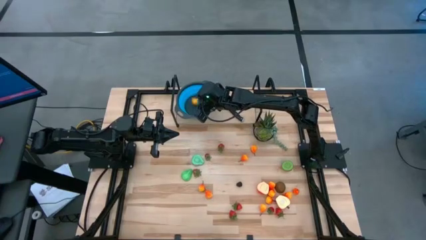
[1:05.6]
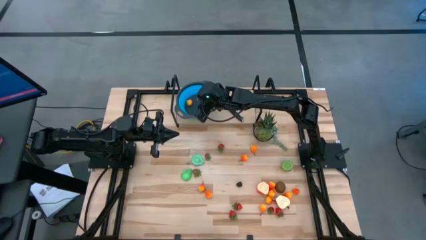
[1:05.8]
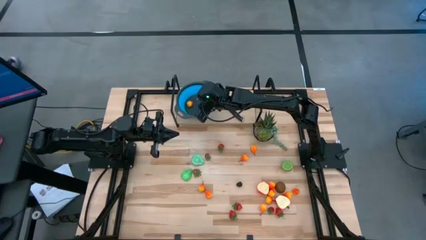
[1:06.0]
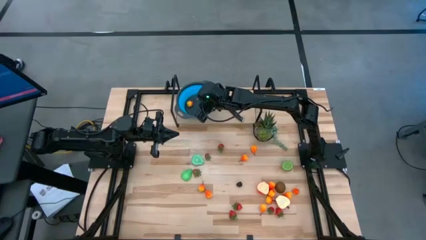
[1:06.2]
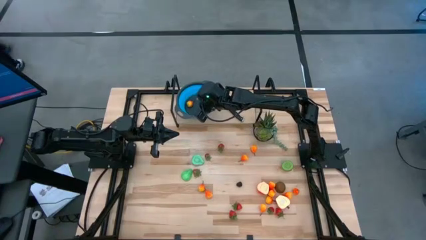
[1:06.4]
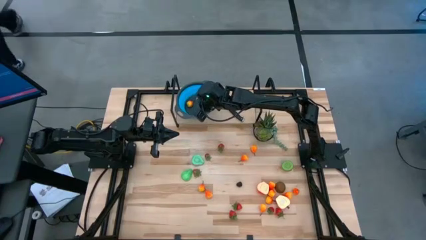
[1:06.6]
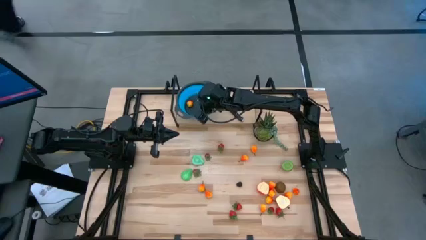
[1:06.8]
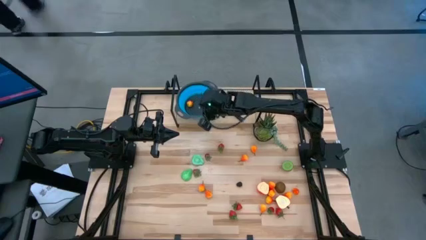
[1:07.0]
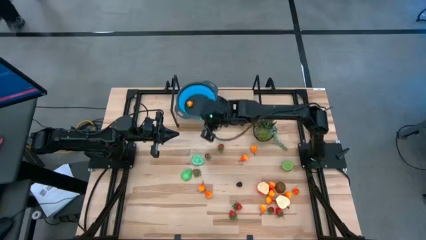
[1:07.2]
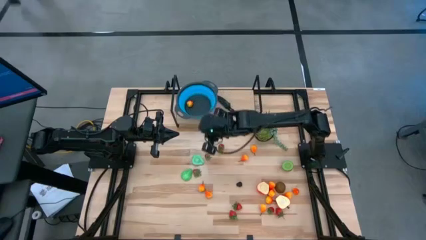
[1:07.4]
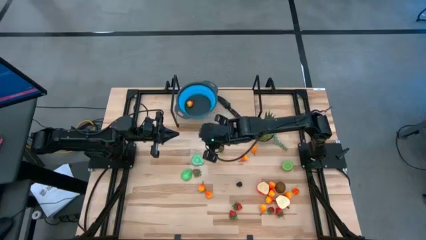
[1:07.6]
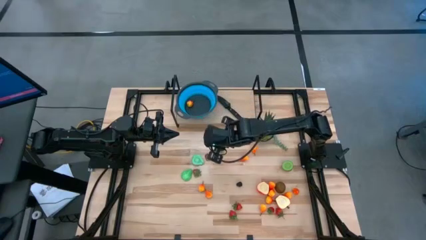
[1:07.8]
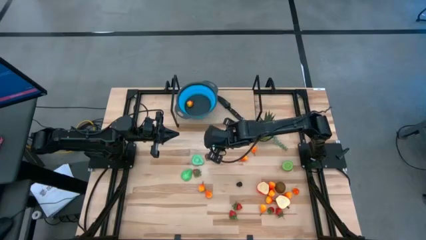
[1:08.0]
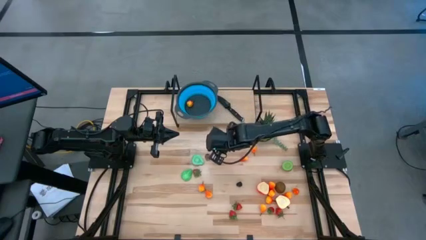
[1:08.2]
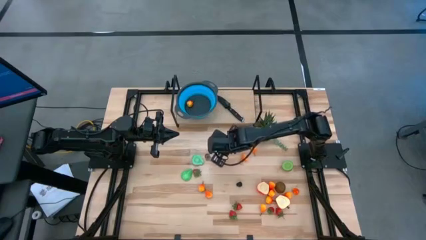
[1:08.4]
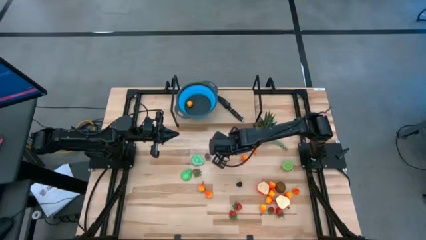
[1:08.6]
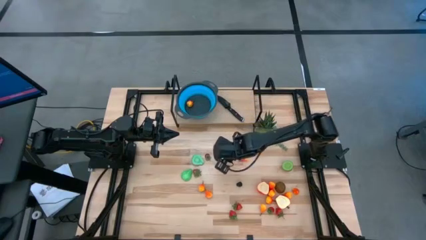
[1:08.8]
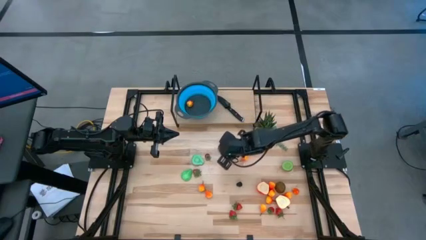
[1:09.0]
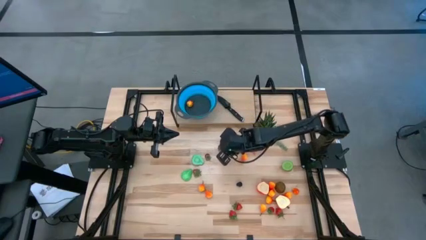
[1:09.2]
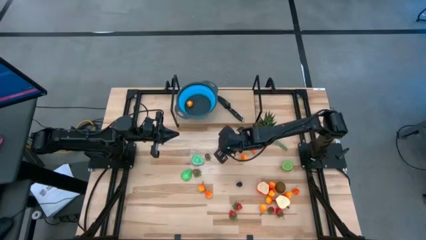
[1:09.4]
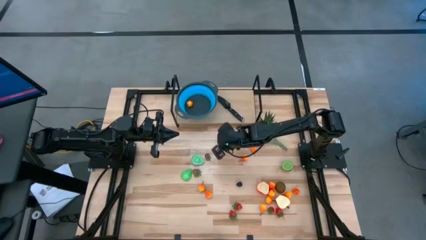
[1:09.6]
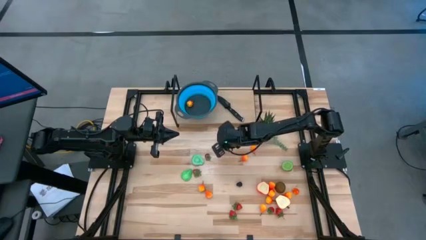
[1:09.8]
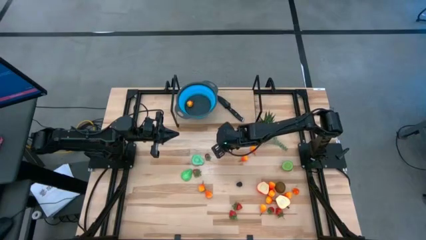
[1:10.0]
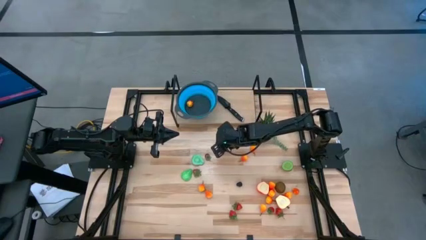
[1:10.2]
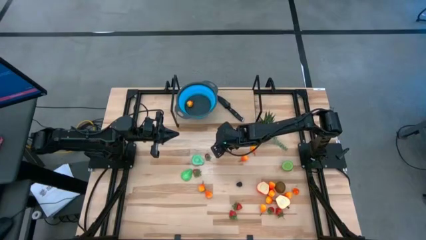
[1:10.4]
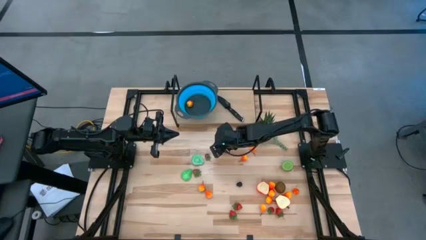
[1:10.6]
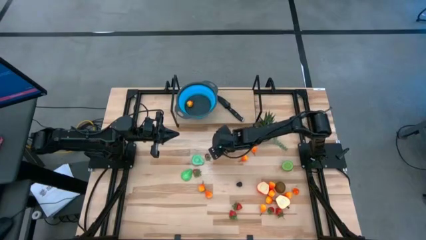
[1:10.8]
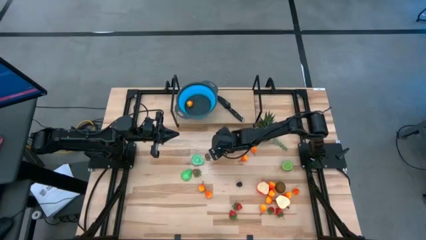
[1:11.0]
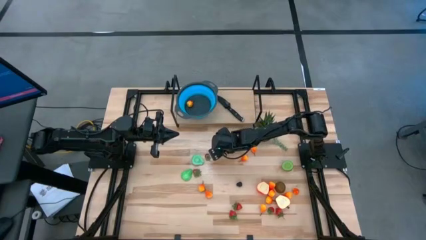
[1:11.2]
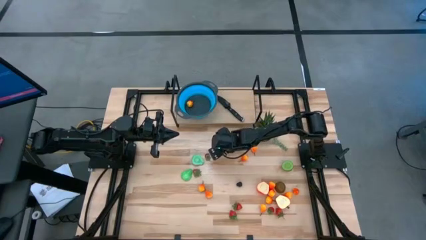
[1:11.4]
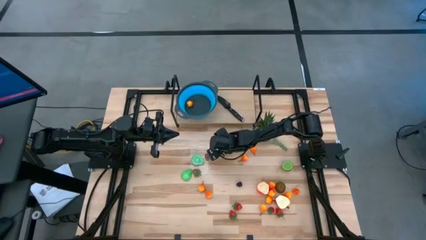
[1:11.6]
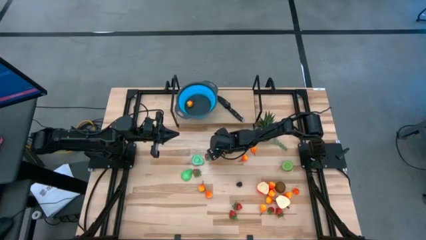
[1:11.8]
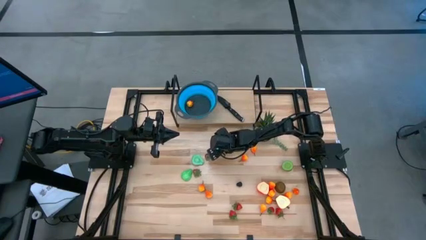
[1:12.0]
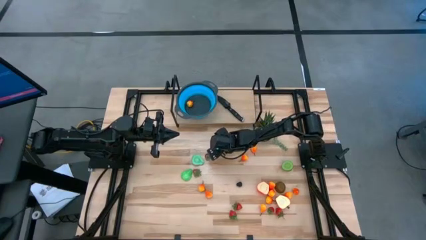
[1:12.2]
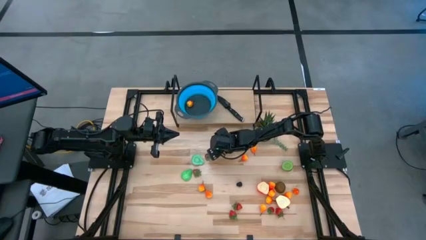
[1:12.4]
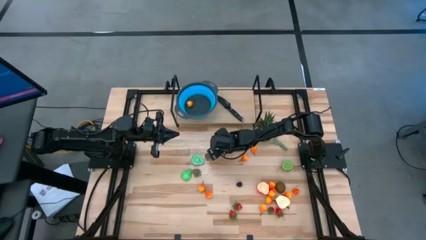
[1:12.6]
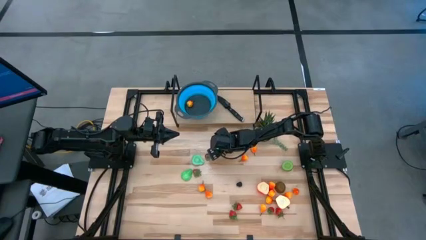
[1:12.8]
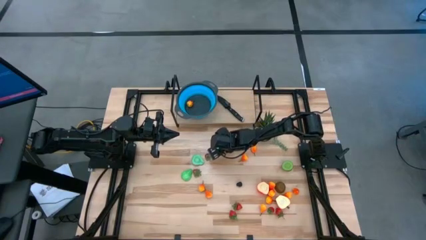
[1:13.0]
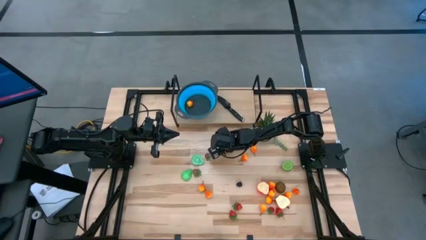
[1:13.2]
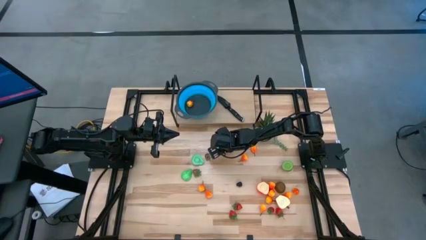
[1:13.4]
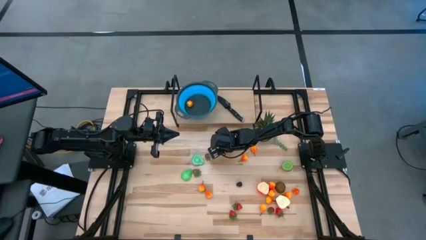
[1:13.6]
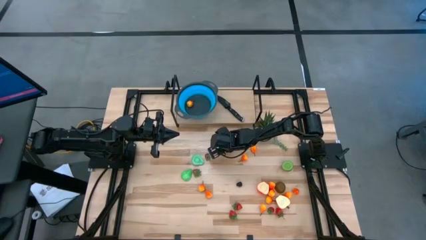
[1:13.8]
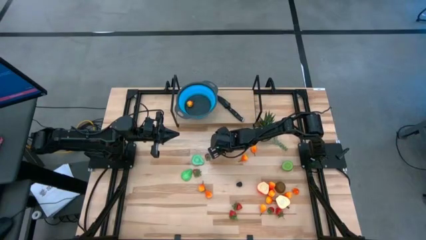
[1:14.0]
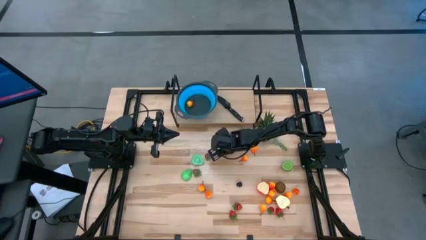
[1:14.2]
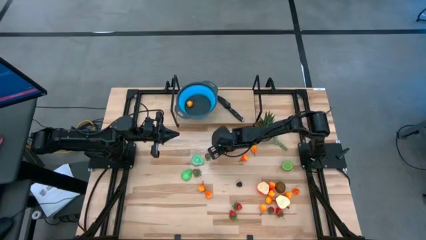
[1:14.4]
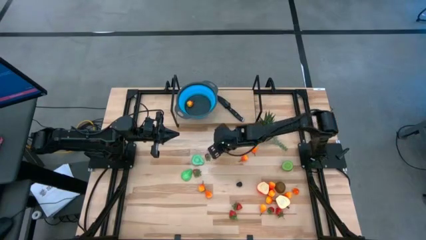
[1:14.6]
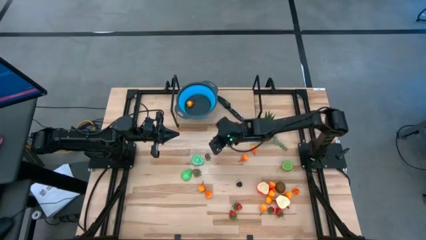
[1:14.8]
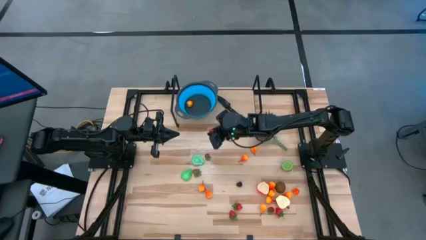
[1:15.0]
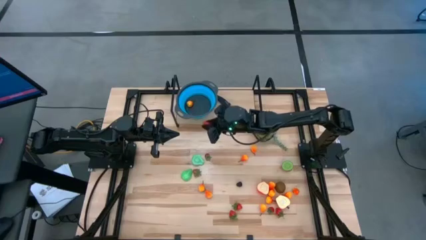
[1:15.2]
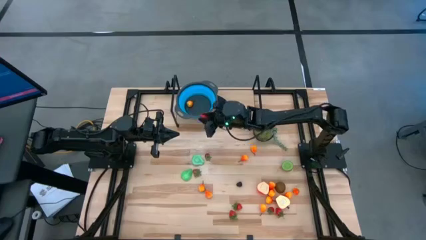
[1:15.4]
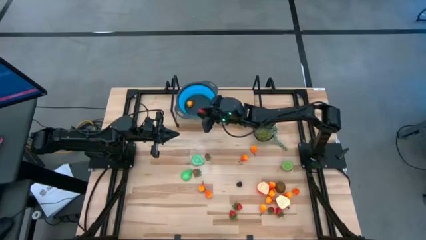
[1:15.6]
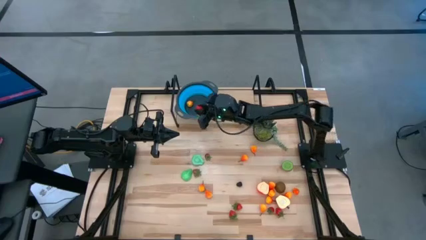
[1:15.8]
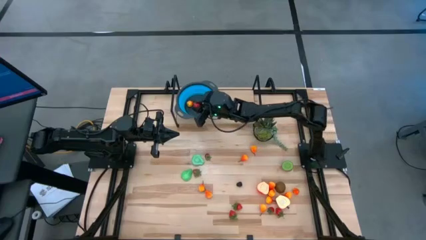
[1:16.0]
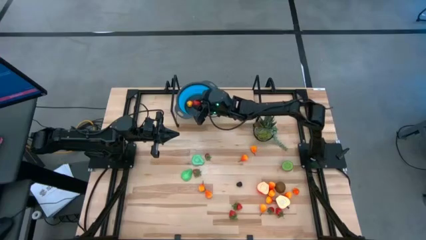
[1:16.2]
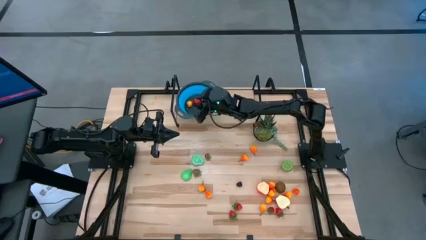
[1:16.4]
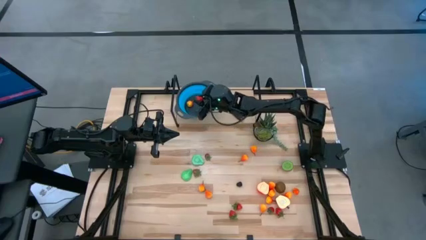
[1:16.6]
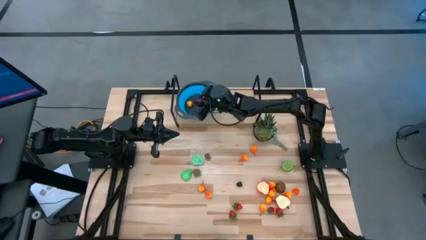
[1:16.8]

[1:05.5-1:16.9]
Task: Pick & Place Fruit
Put the strawberry into the basket

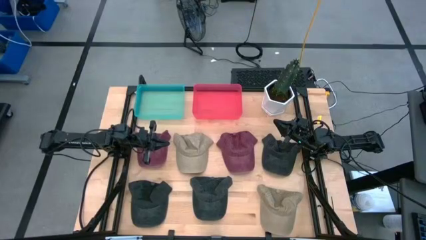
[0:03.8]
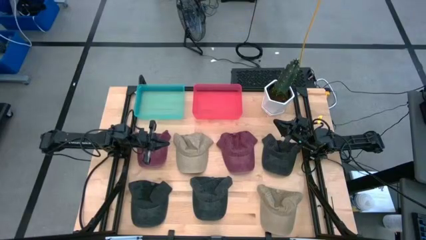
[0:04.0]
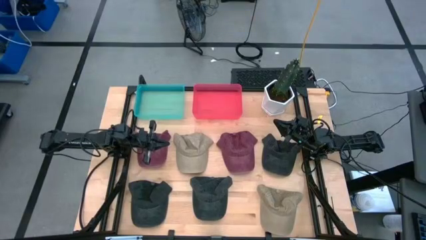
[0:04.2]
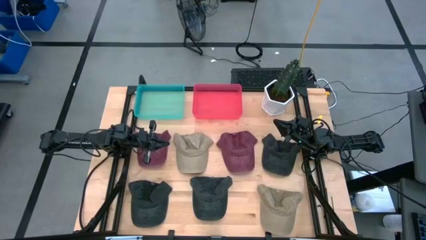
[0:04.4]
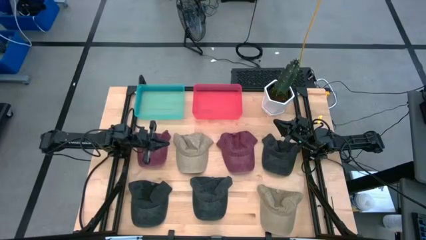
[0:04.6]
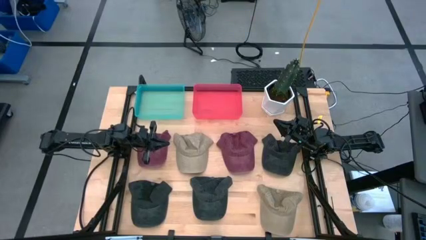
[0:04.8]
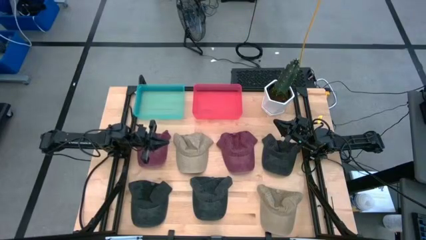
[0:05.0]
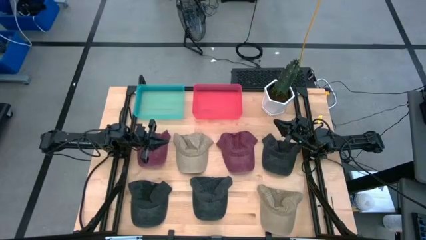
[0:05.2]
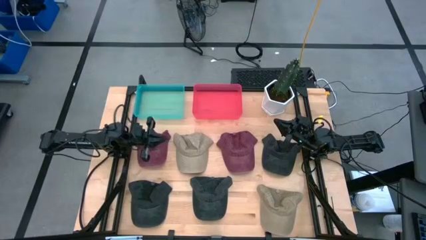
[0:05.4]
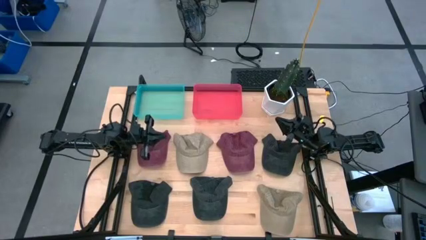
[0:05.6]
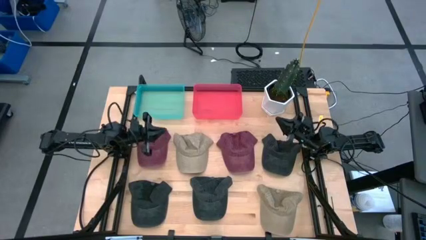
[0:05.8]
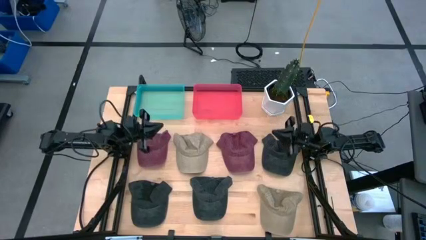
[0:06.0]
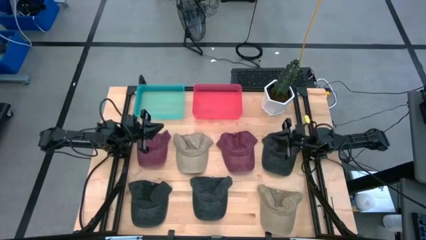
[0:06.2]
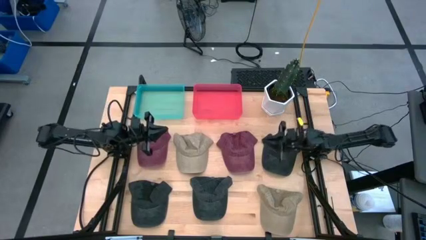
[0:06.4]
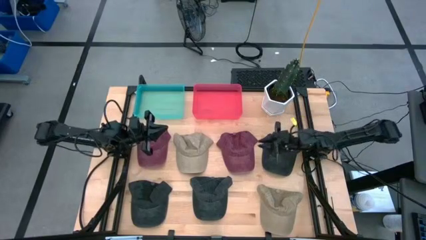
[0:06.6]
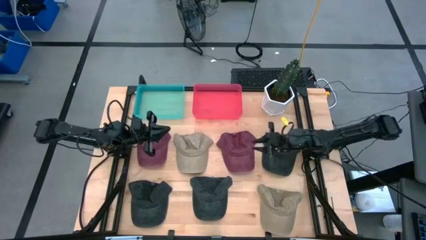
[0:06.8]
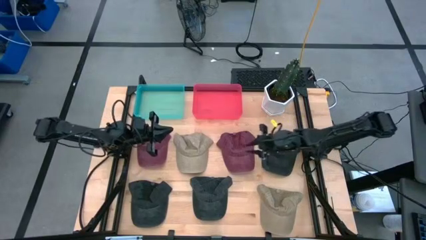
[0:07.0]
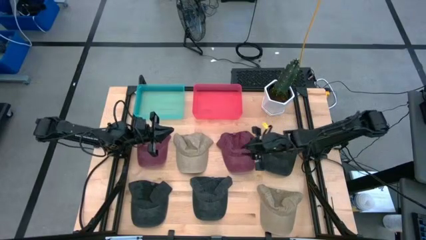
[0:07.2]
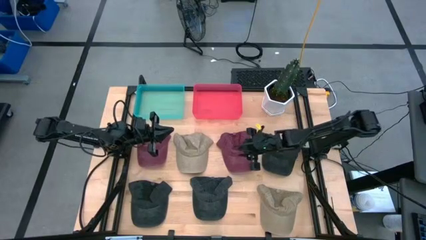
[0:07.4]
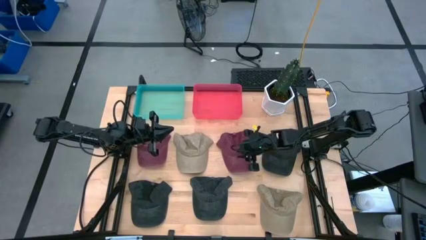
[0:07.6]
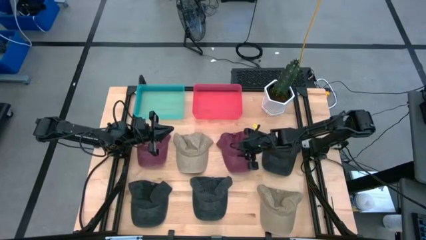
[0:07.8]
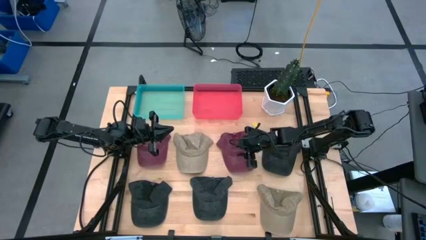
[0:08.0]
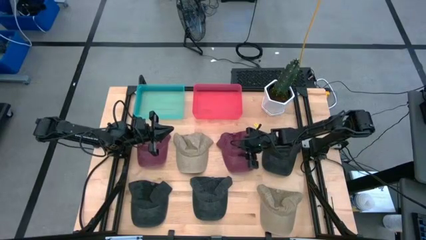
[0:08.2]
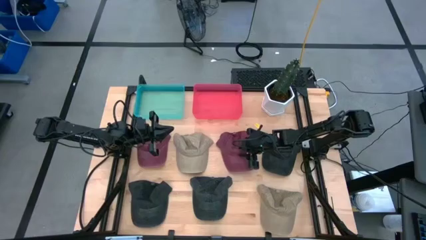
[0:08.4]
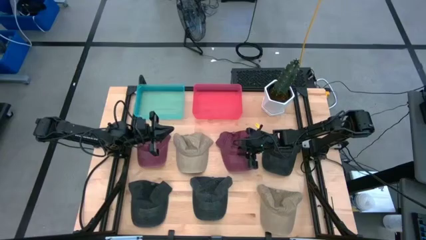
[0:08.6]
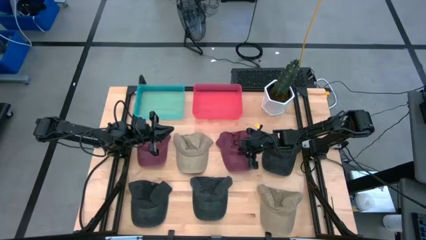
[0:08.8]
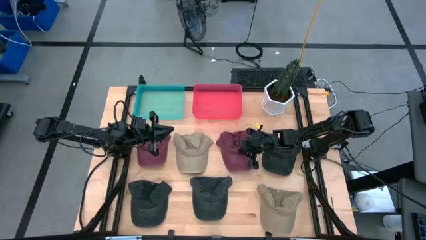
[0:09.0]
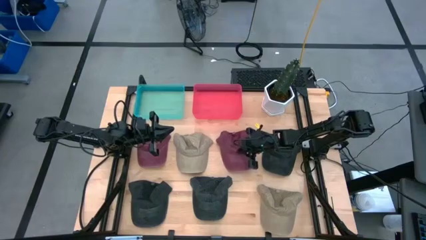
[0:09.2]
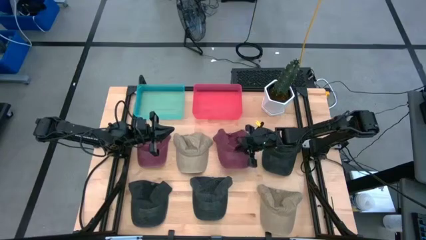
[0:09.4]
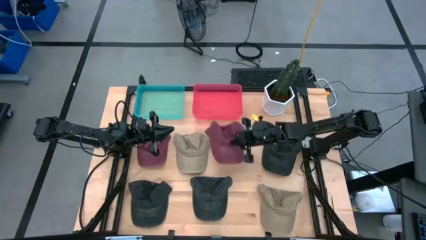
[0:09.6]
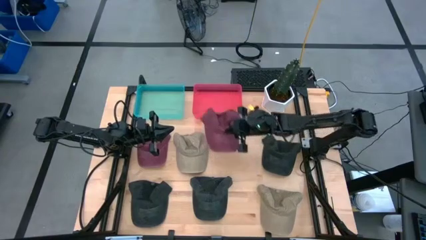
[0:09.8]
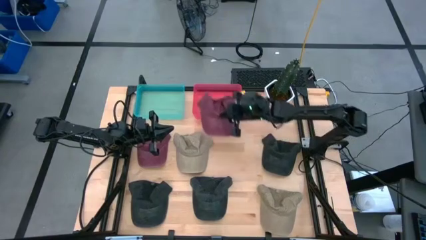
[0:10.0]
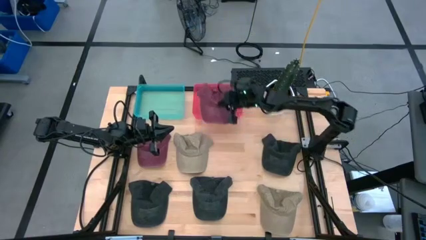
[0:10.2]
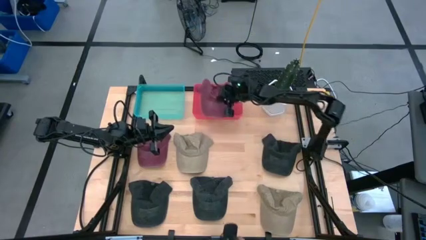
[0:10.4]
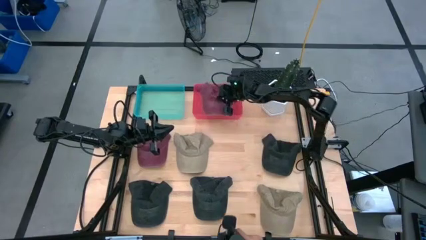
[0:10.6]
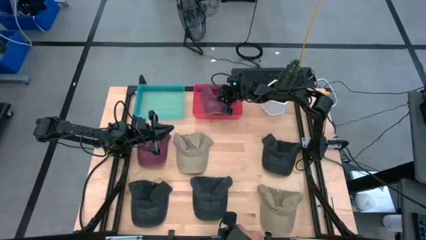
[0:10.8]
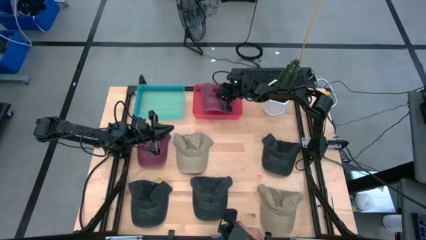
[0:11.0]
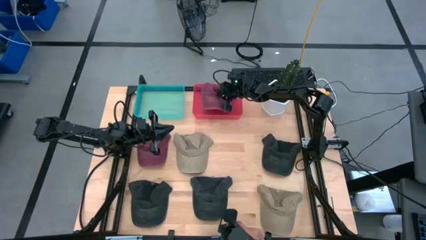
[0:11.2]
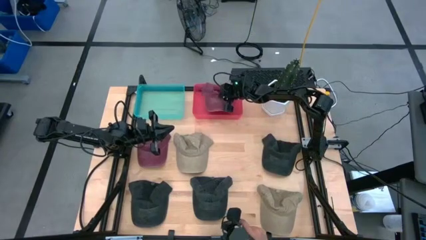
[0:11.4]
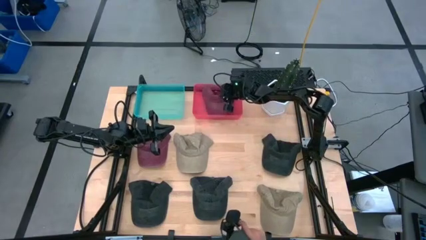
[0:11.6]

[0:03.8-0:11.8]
Task: Pick & Place hat
Put the right red cap into the red bin
